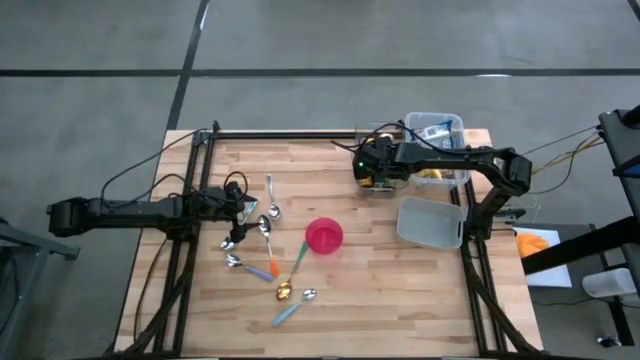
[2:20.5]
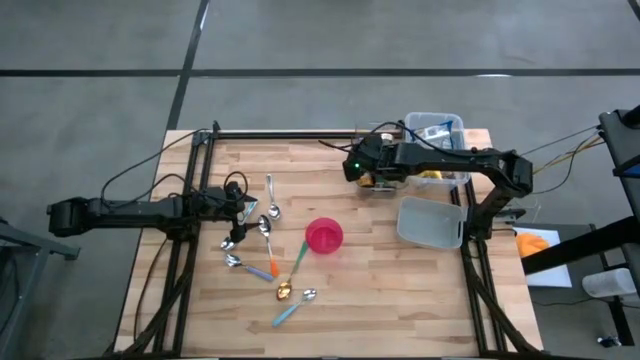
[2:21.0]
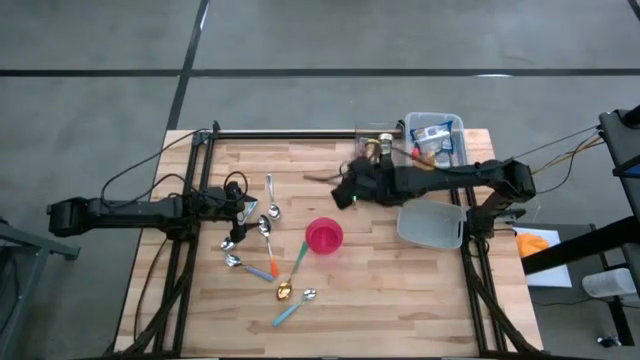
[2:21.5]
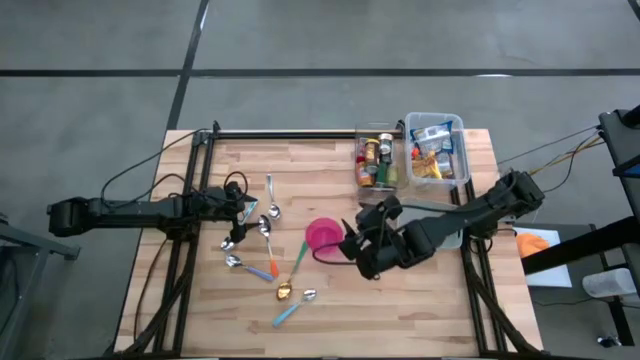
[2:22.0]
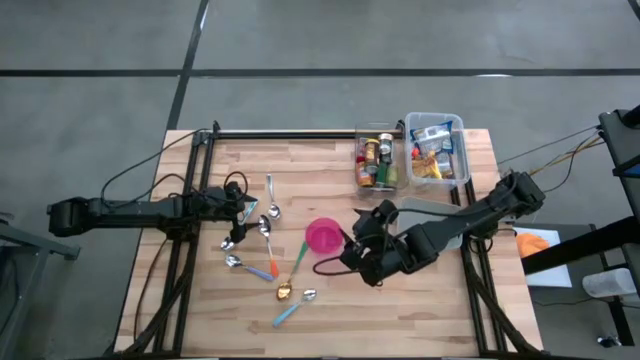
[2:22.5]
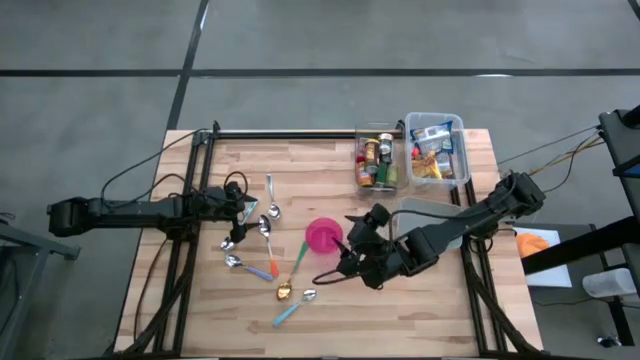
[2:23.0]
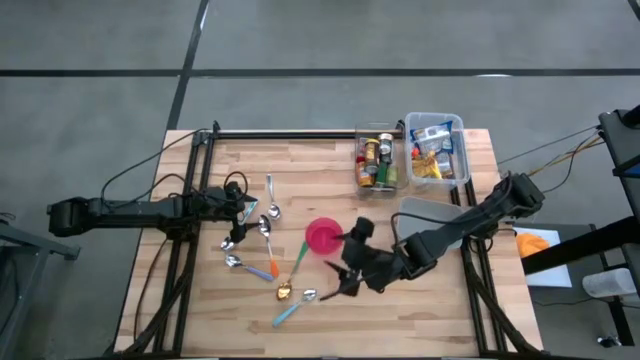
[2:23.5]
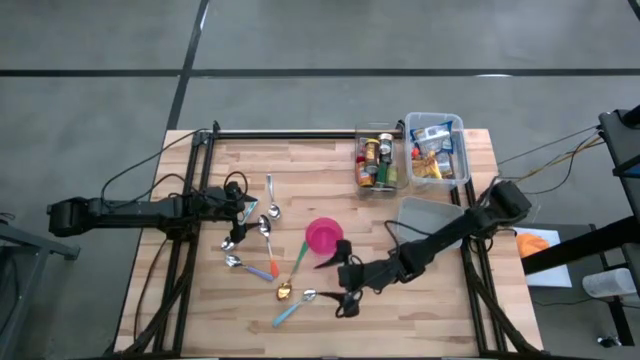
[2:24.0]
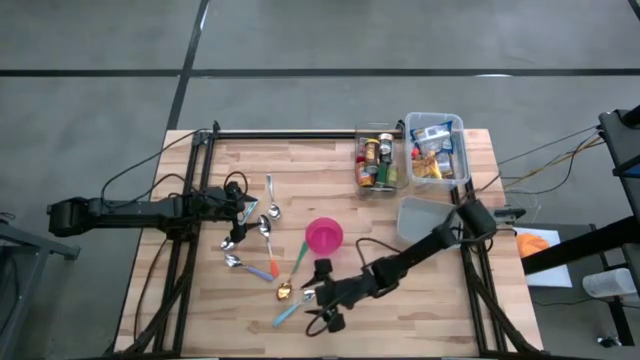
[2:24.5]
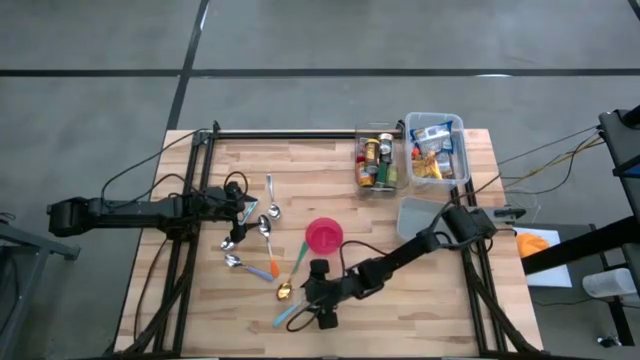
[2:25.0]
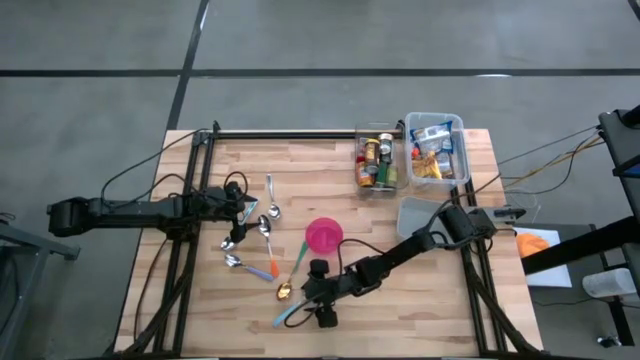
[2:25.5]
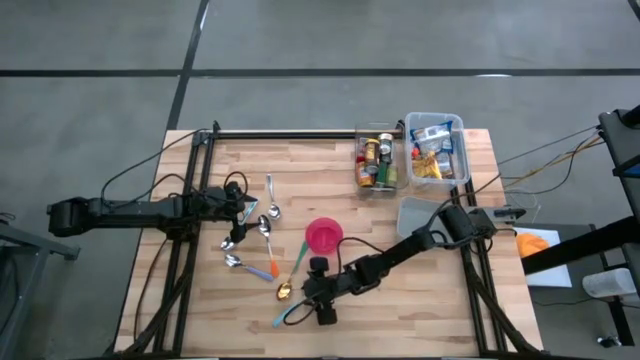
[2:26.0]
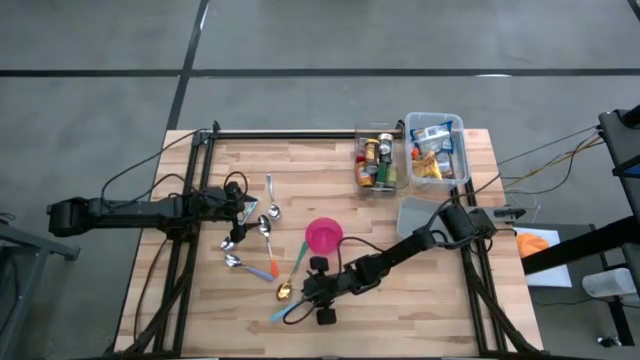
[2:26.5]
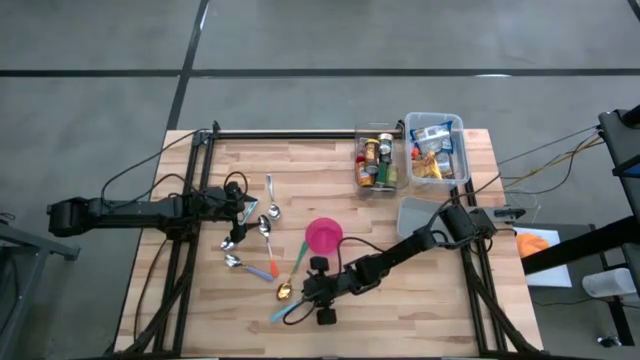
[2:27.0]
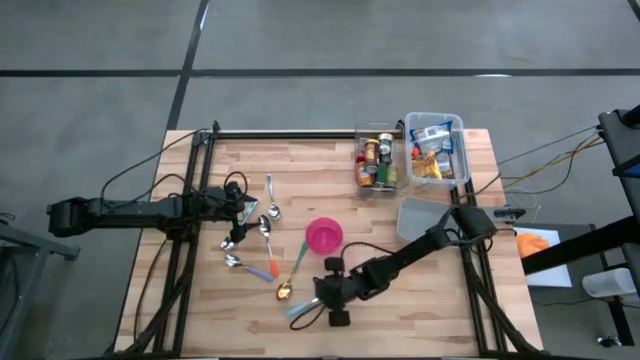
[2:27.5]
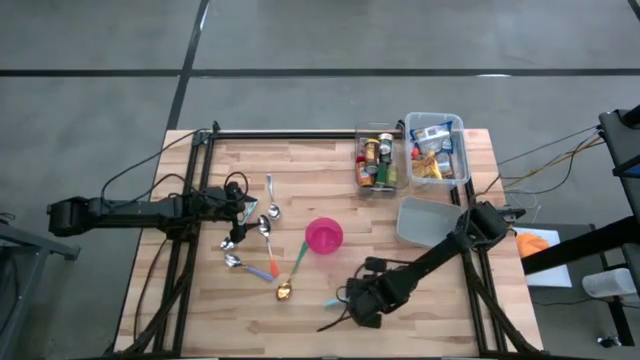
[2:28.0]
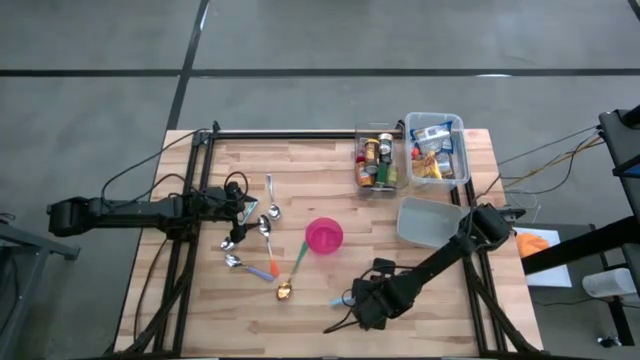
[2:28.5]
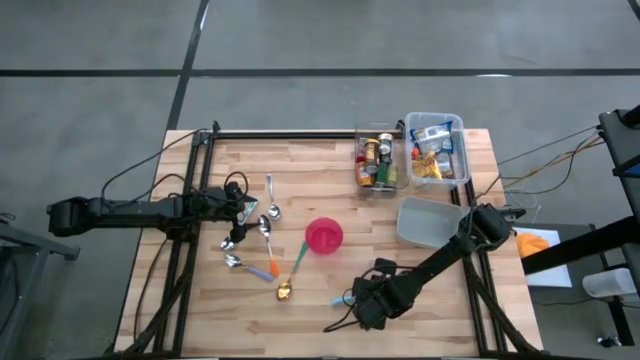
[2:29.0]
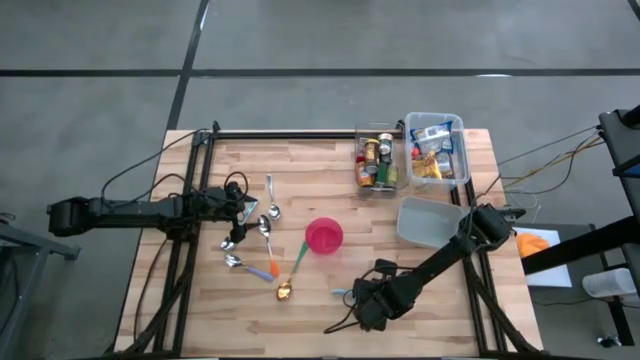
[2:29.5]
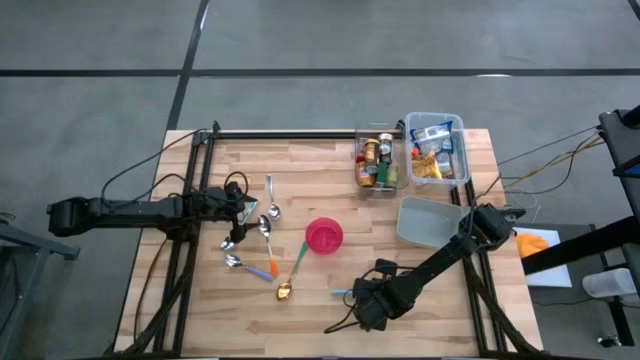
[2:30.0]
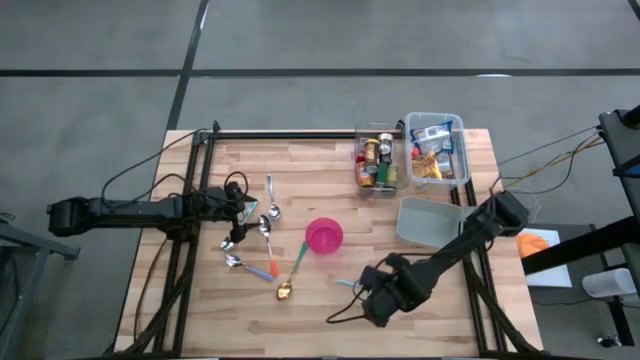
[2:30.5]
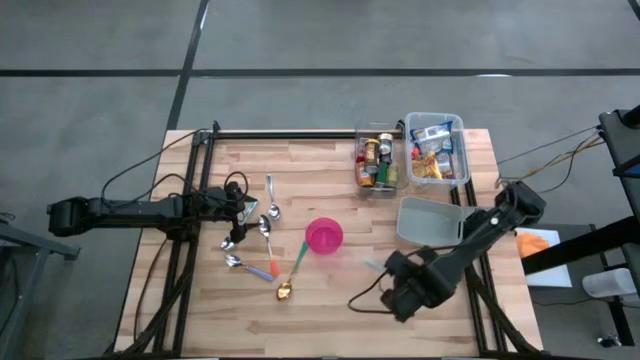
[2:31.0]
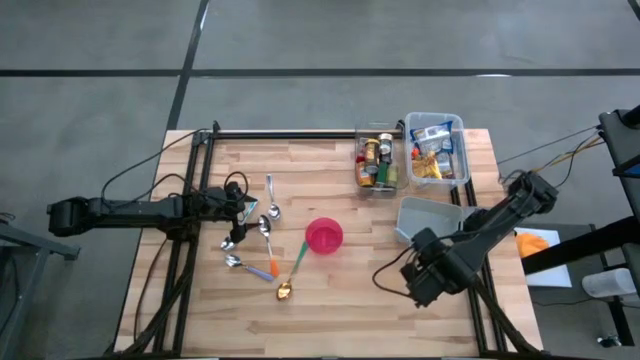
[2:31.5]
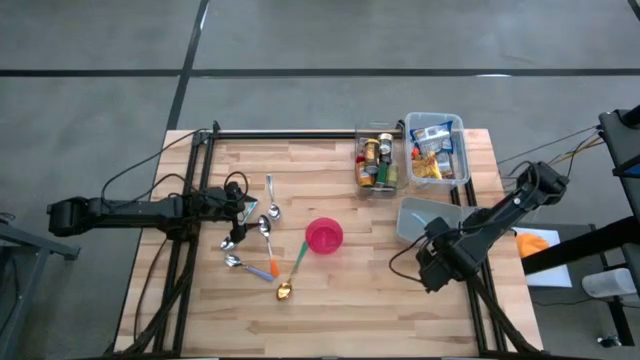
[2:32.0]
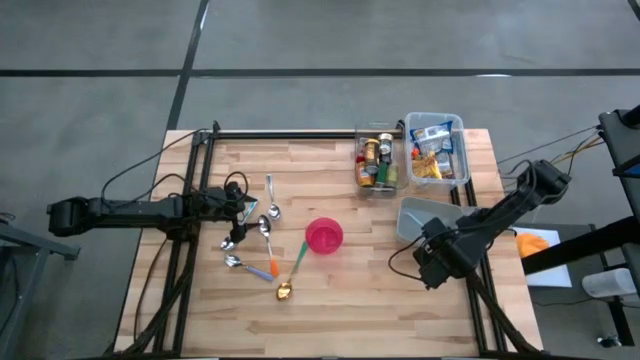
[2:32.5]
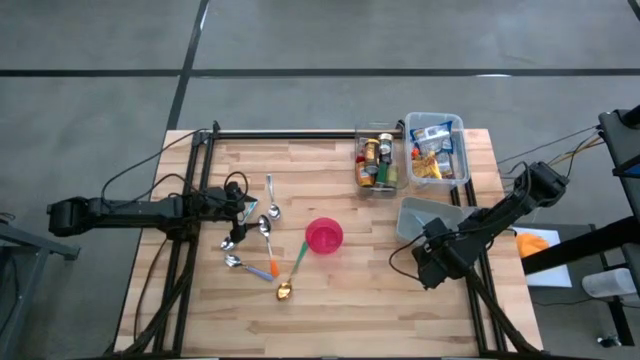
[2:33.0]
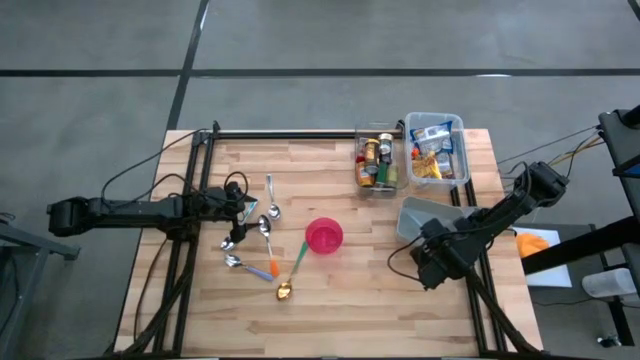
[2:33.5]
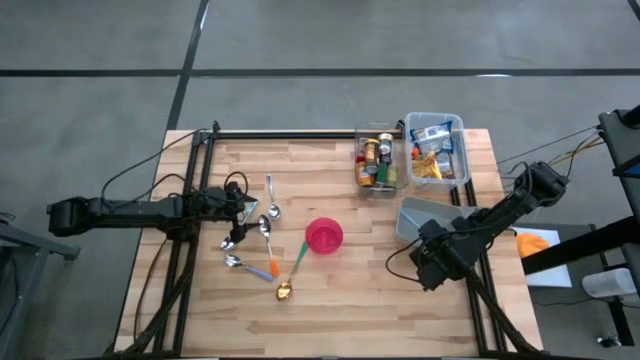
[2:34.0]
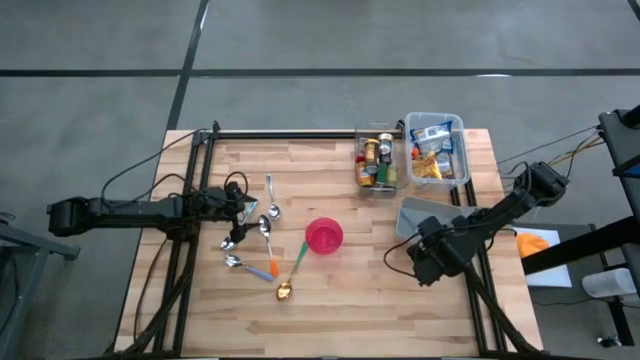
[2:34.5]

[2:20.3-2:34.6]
Put the blue spoon into the gray bin
